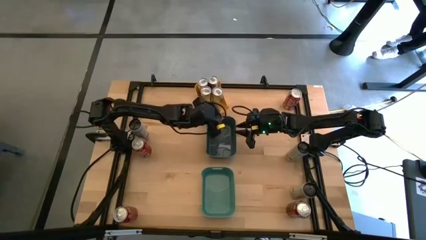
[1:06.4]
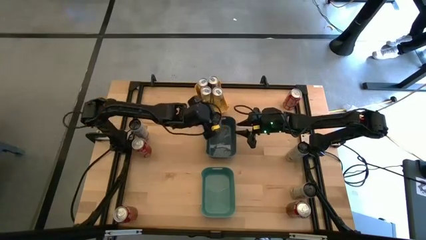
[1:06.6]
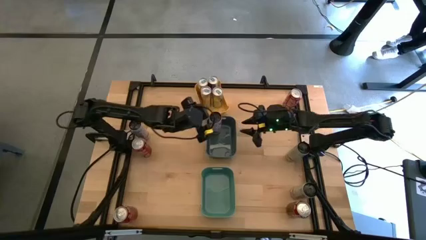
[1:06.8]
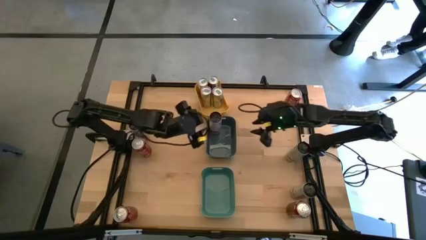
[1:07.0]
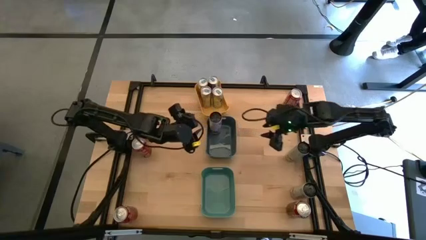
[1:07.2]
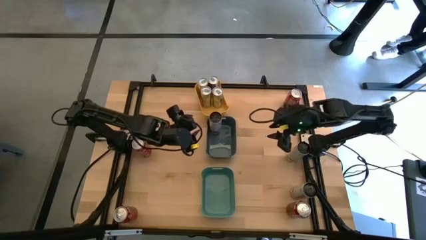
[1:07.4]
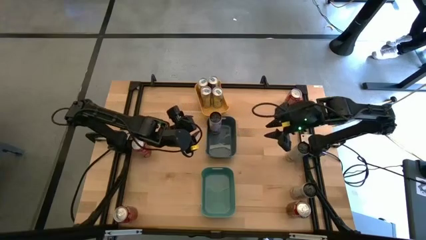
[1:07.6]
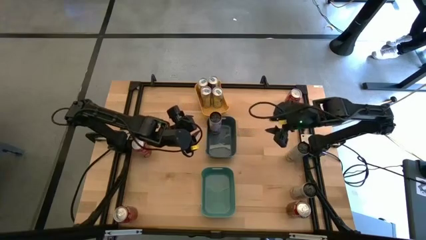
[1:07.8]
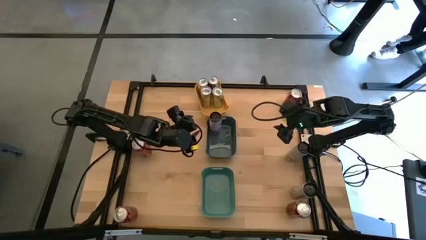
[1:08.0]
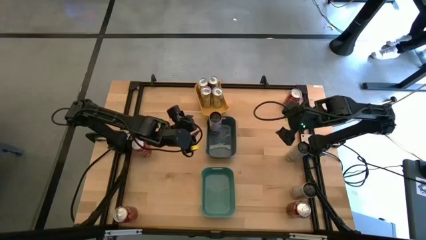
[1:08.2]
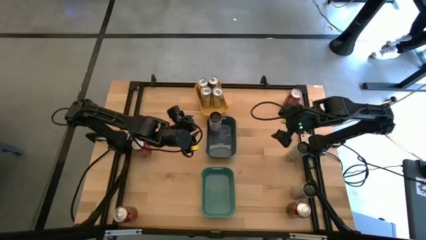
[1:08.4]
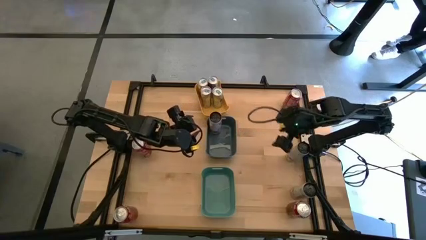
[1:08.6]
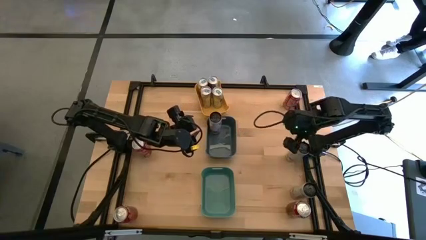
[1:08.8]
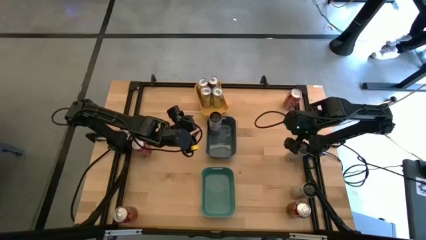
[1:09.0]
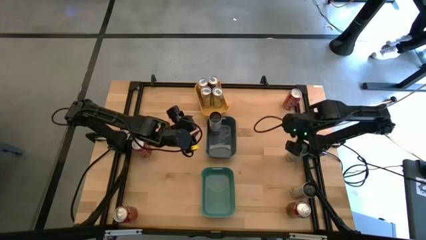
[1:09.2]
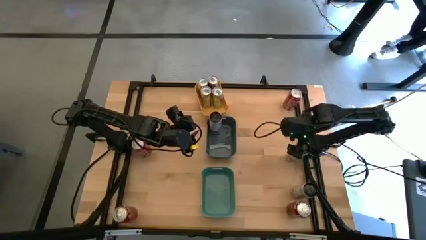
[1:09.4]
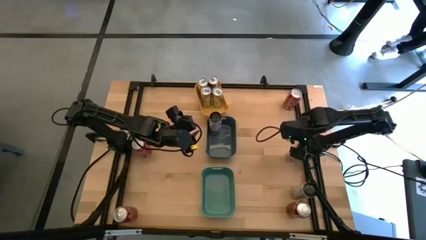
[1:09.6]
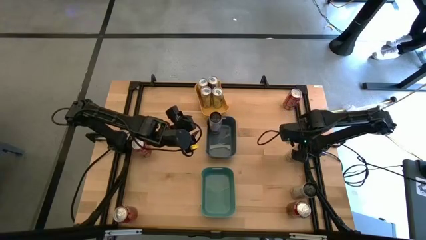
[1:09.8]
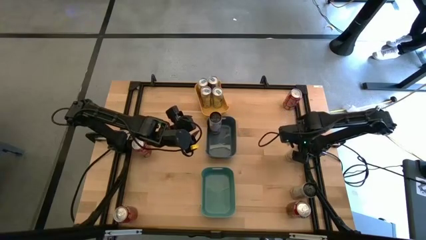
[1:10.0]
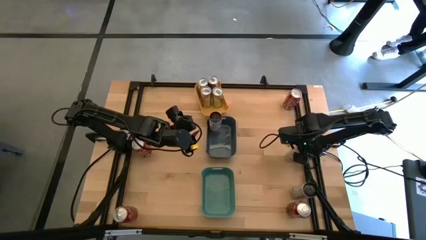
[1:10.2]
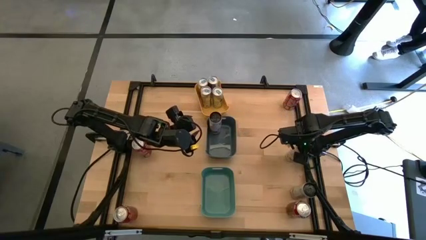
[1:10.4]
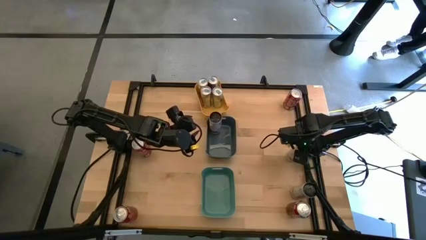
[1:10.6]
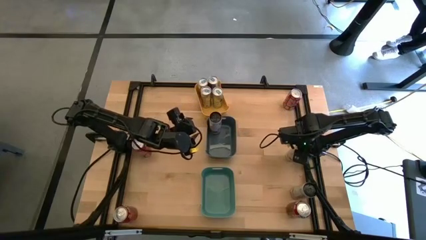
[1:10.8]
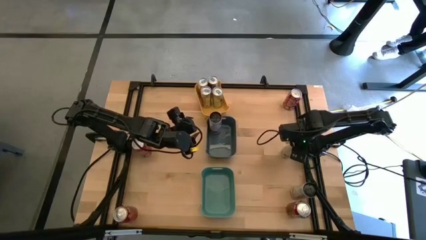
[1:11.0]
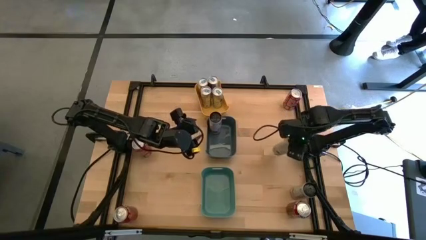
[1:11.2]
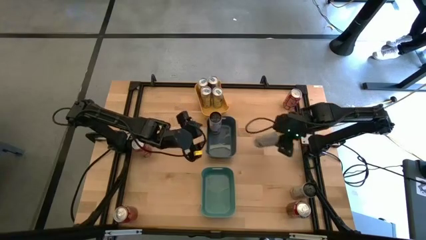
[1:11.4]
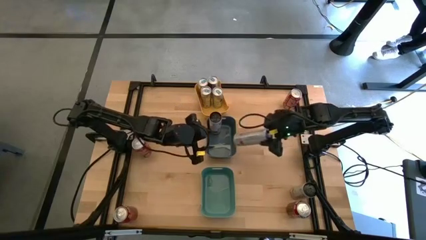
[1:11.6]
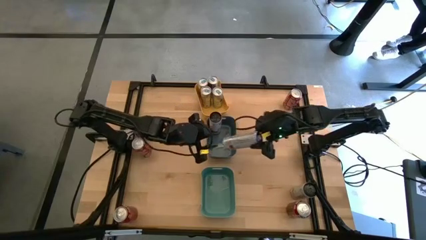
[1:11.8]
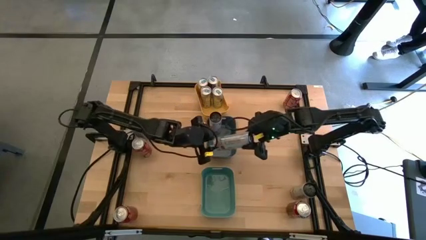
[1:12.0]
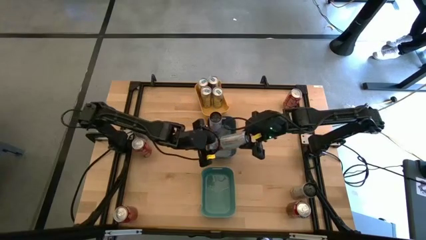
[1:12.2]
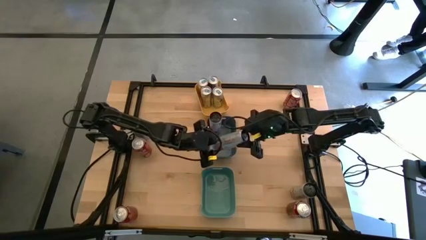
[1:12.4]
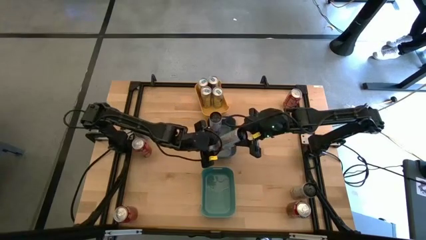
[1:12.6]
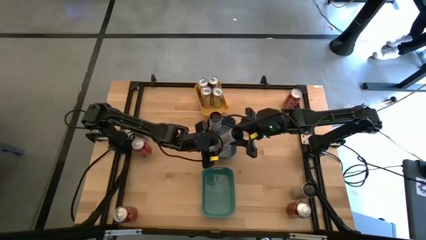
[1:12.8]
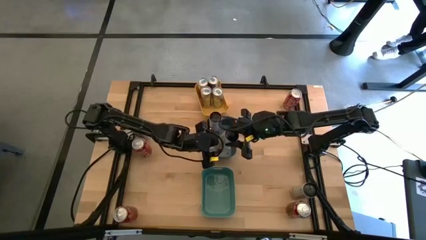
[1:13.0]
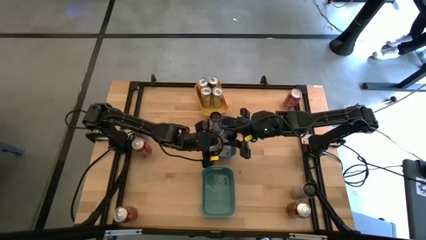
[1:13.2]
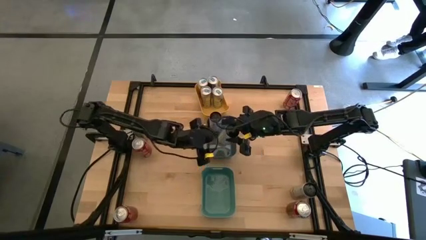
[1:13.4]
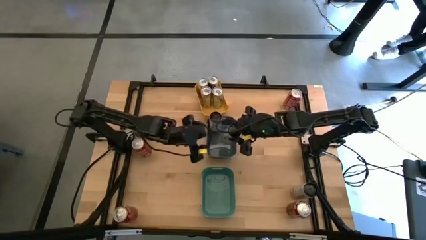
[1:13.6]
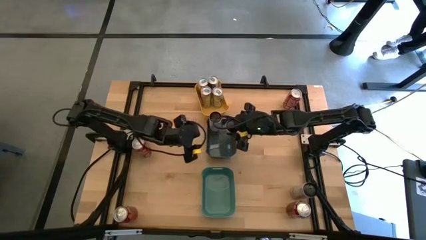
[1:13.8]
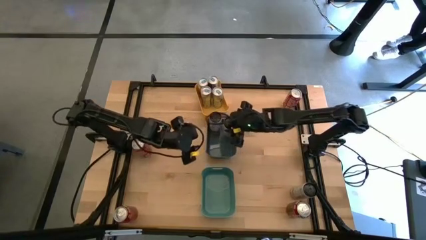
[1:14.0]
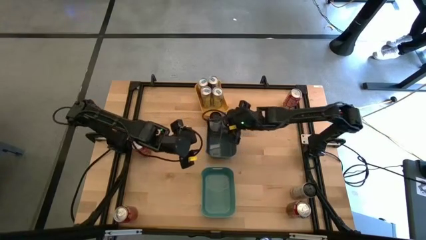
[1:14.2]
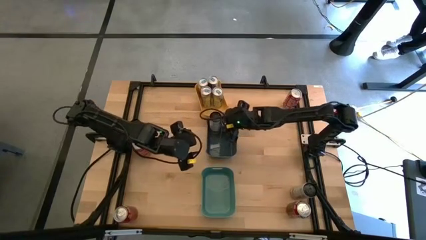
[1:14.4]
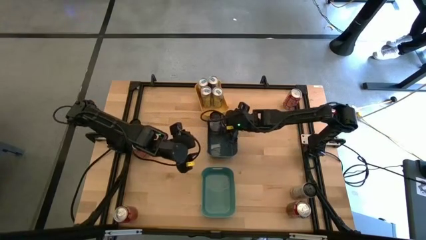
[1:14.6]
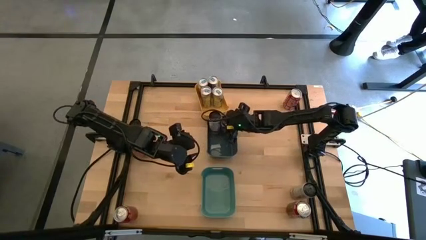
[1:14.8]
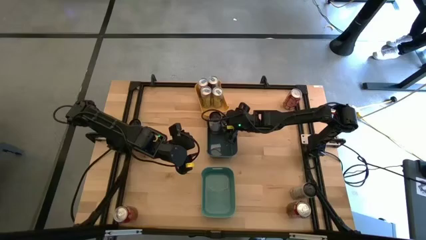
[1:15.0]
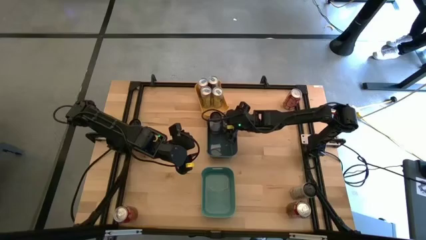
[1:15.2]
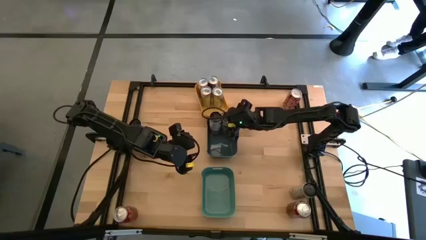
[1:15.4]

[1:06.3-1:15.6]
Task: Sort soda cans
Put the top right black soda can into the dark green bin

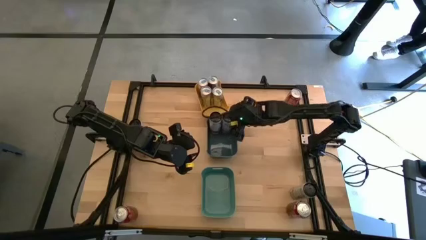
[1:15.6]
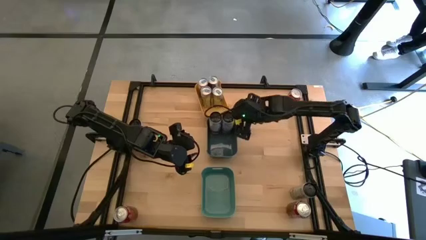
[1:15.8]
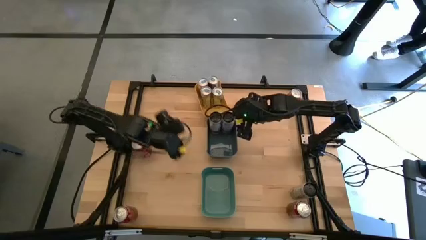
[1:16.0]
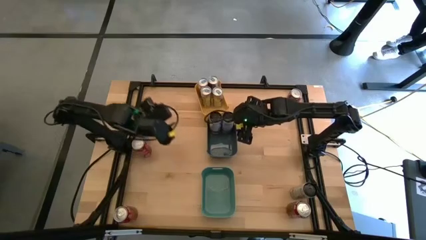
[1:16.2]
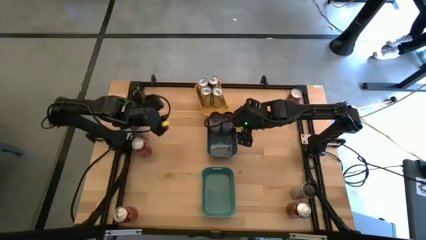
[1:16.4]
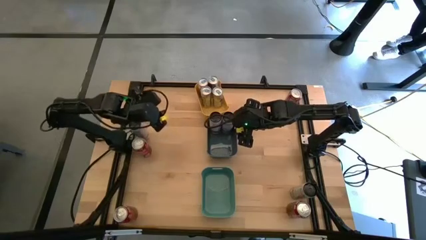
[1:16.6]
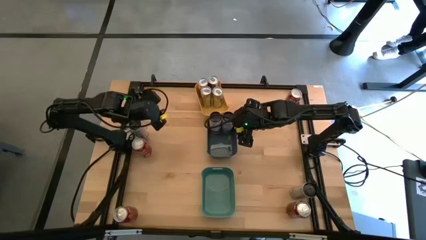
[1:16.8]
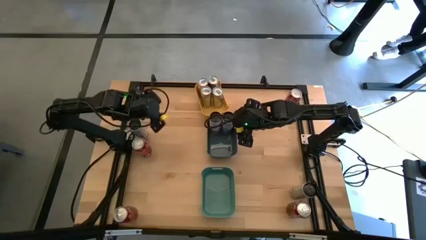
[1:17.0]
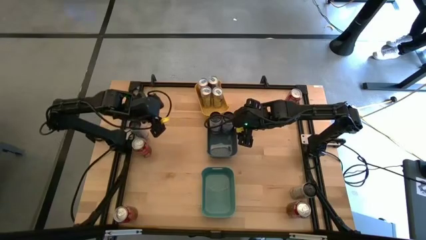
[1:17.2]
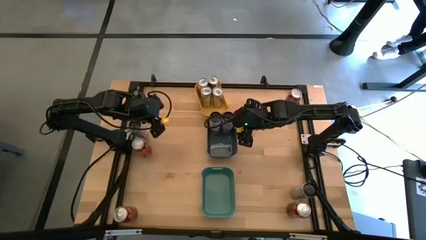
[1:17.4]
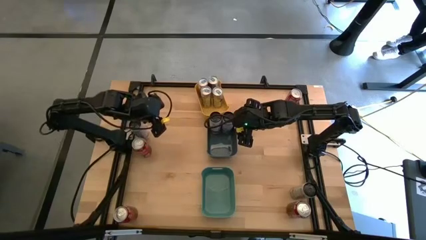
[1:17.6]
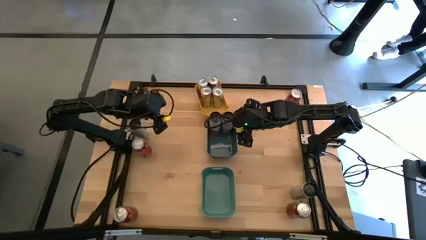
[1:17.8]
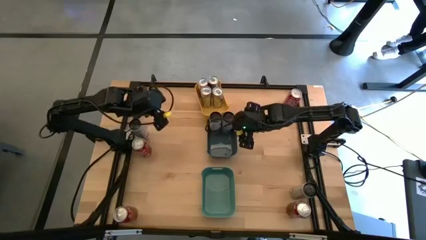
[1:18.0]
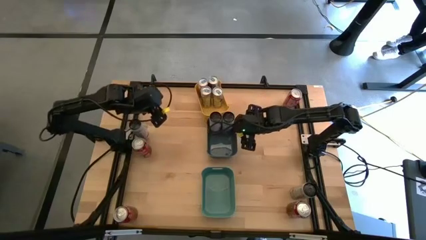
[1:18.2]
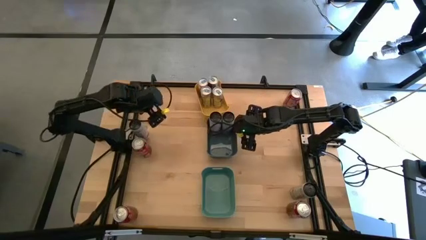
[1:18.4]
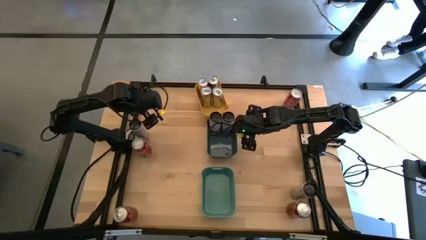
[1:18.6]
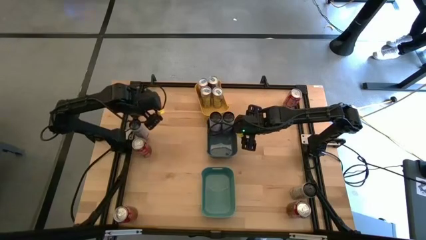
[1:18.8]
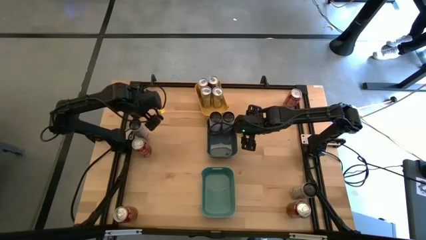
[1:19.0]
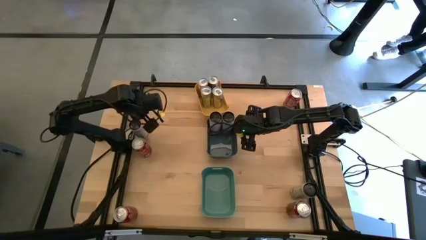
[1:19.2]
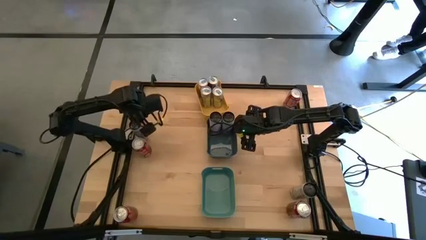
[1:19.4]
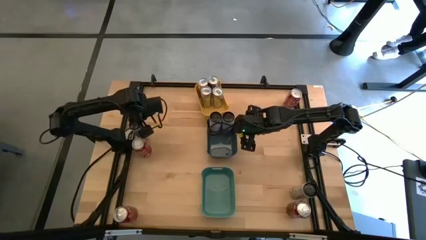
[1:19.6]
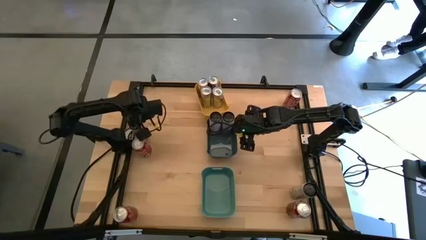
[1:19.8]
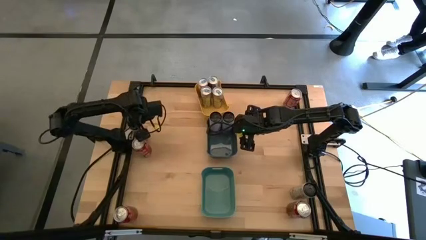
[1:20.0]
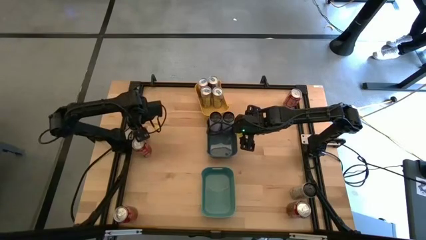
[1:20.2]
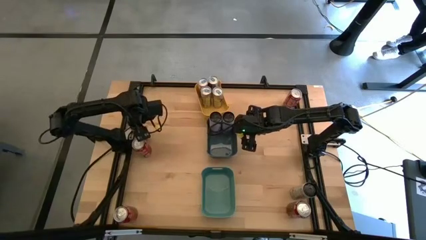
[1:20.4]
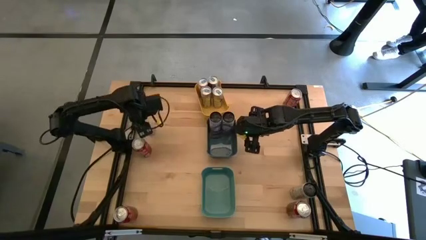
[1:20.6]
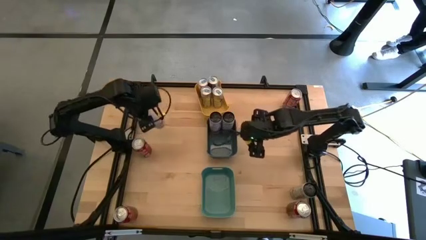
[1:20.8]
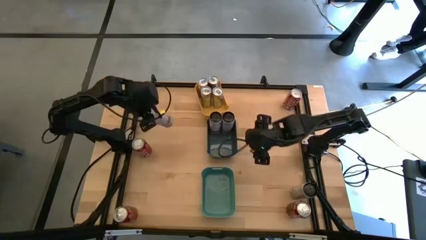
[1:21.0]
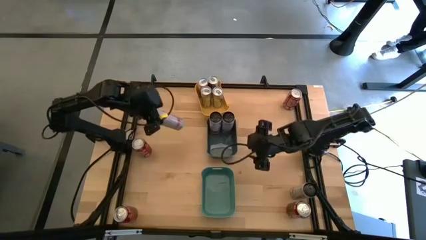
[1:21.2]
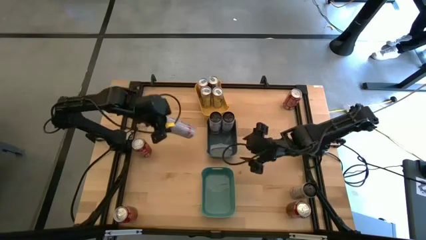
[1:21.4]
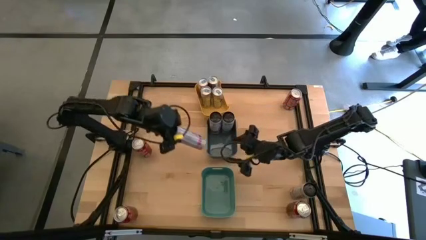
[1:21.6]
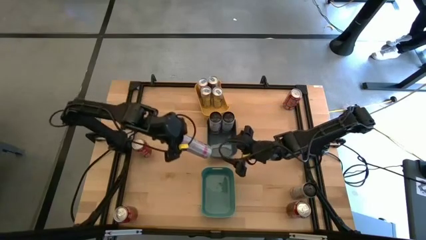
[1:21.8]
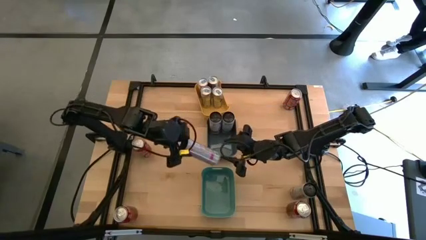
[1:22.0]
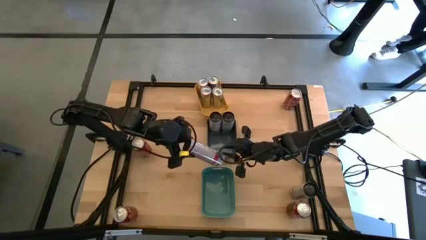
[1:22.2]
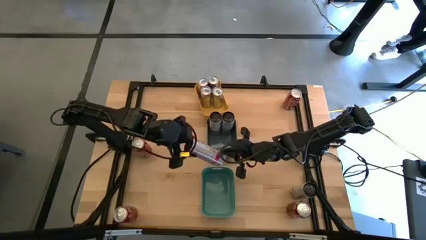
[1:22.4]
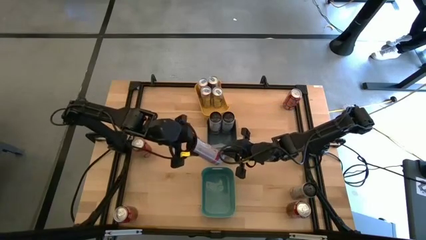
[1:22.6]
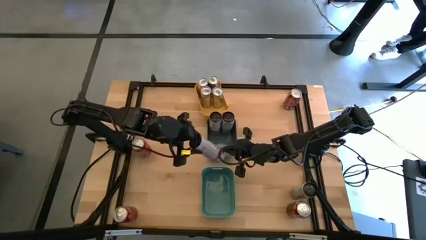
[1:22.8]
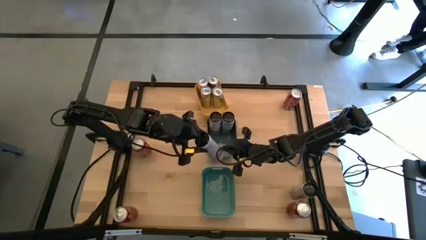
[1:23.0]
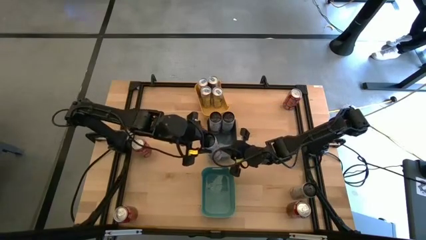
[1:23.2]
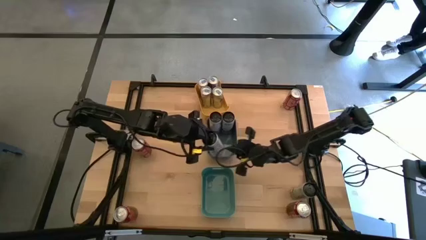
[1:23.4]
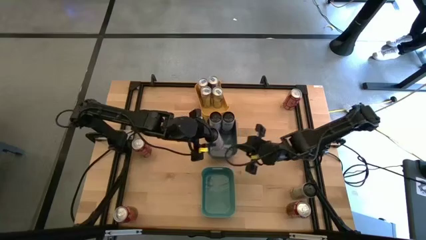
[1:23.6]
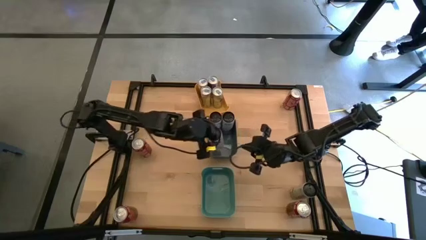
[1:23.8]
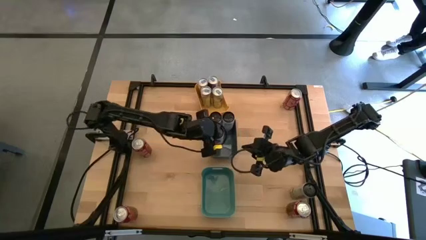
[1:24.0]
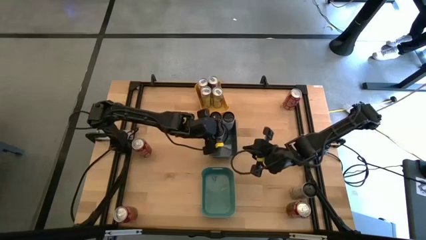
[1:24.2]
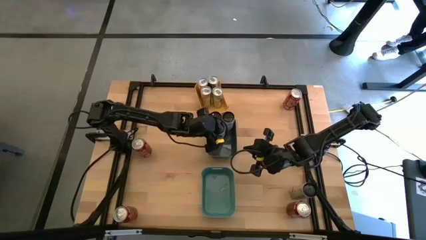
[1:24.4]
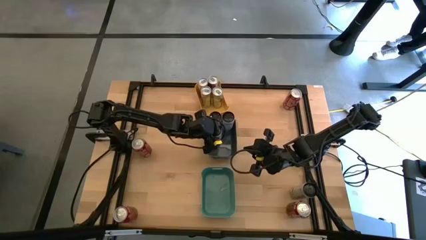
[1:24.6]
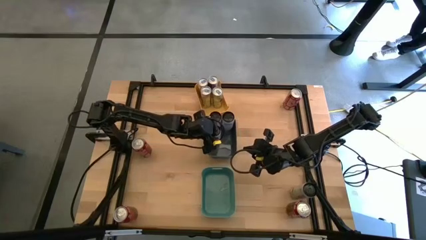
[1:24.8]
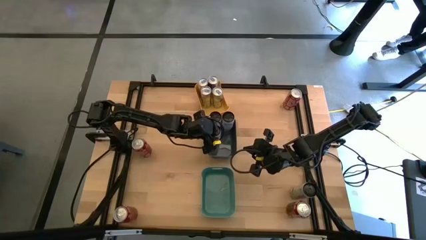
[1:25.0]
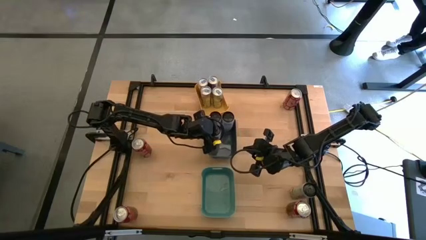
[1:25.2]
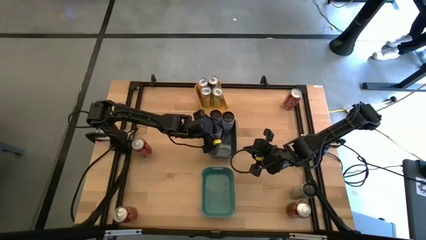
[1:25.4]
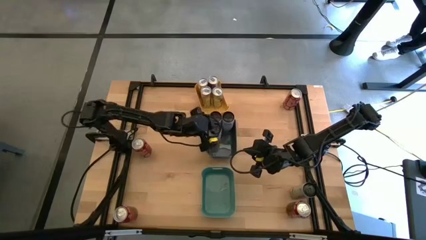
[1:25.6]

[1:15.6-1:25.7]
Put the top black soda can into the dark green bin
